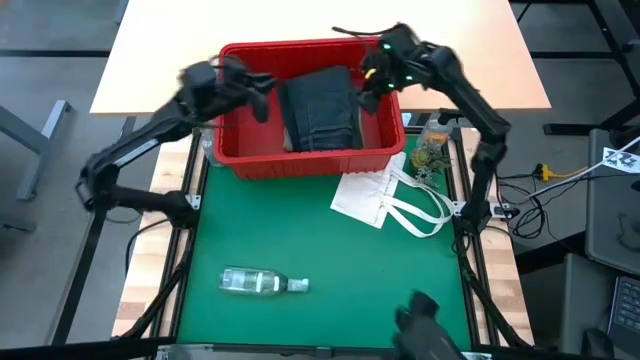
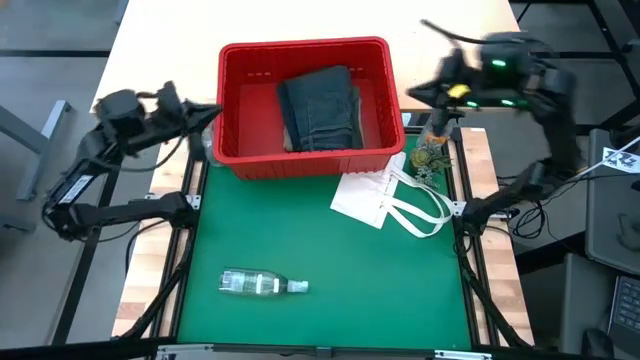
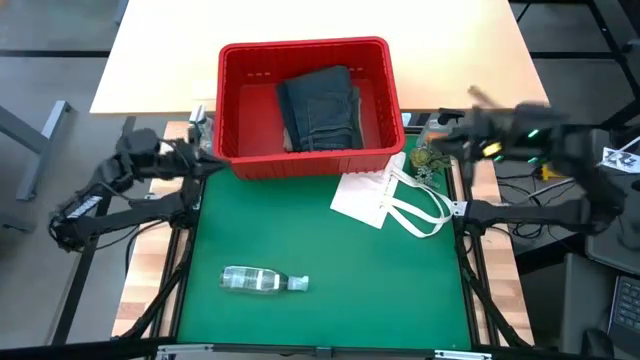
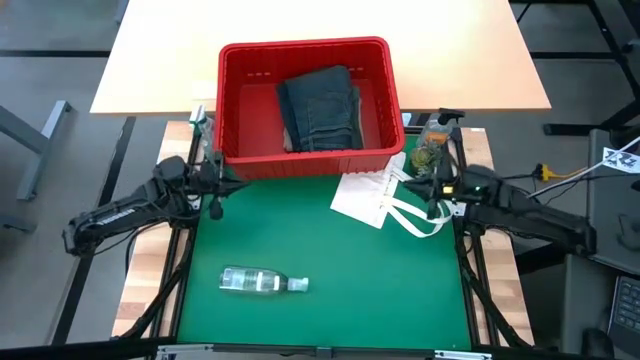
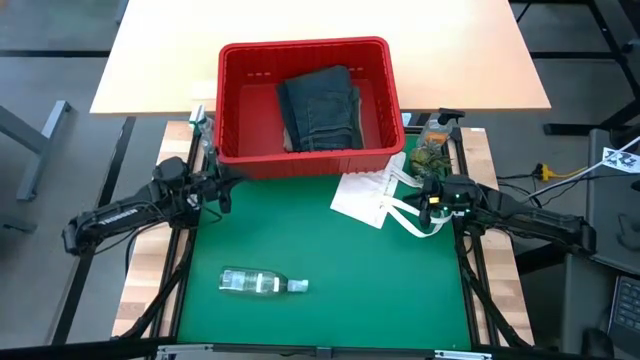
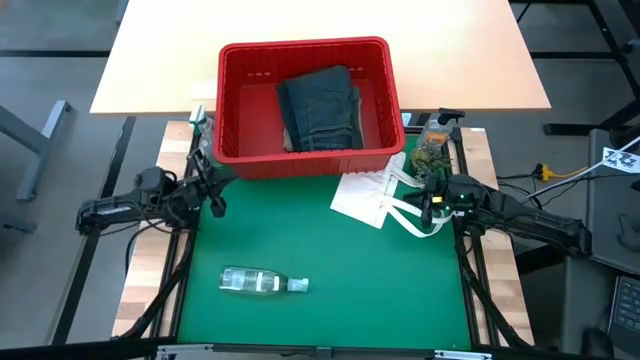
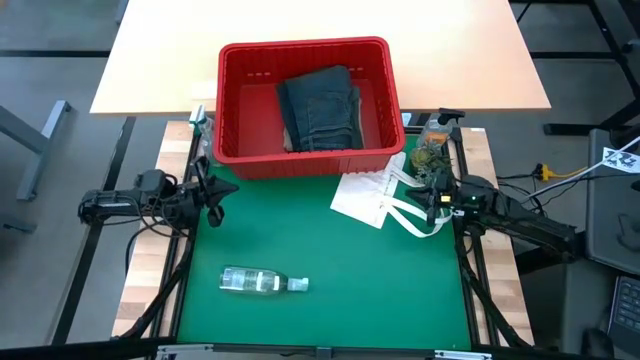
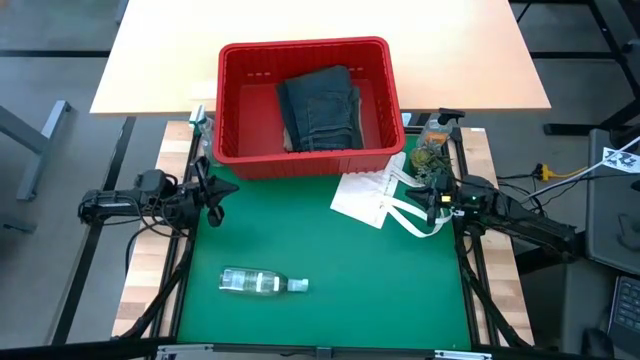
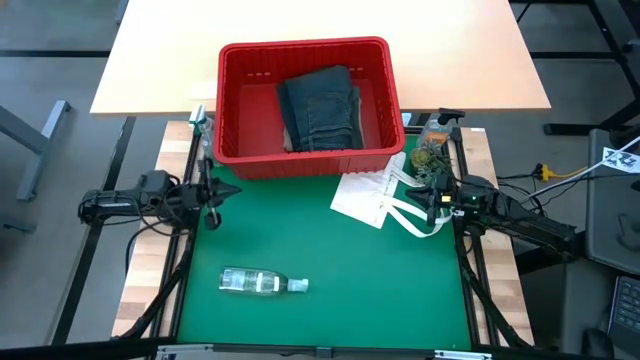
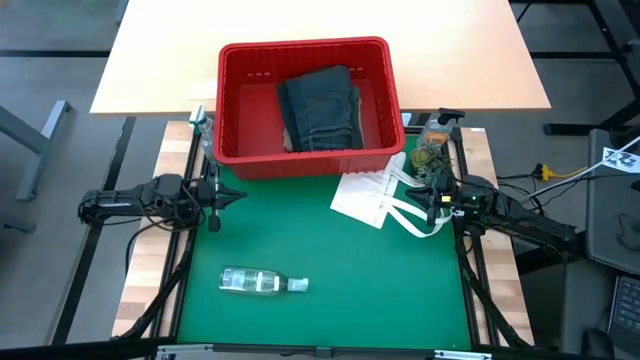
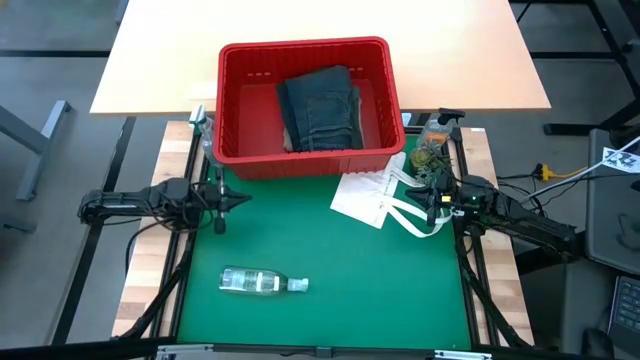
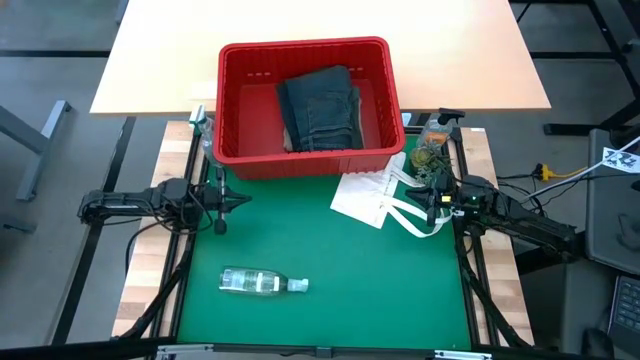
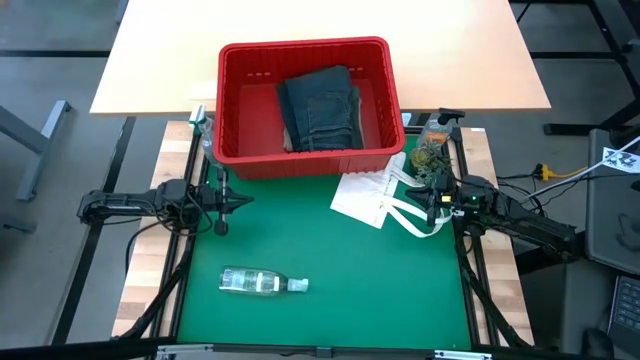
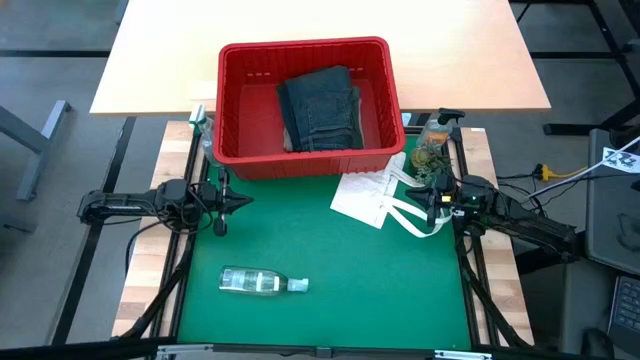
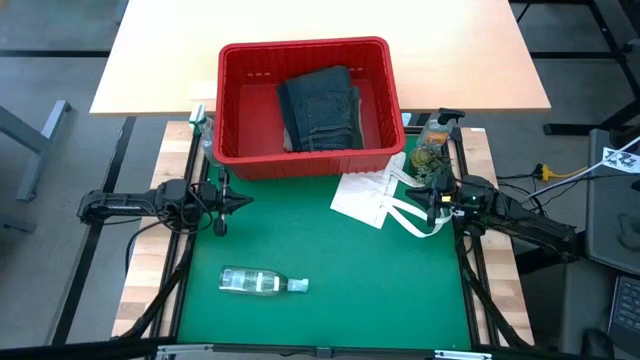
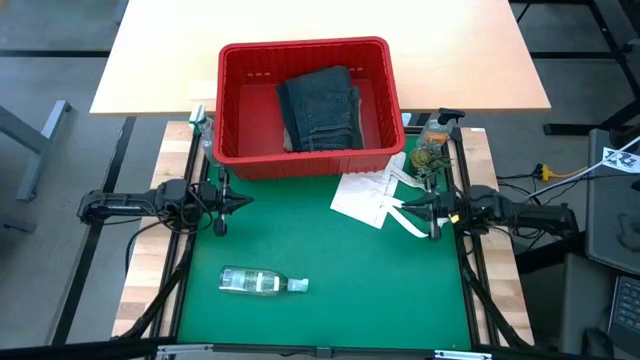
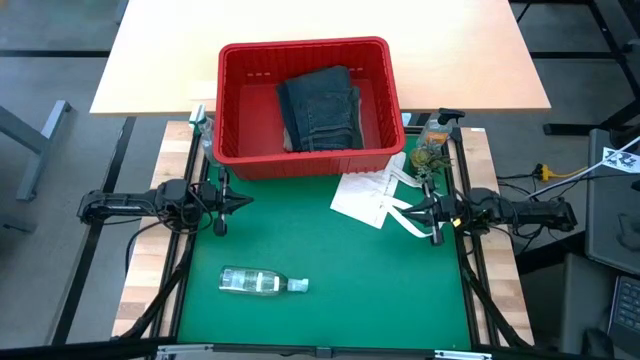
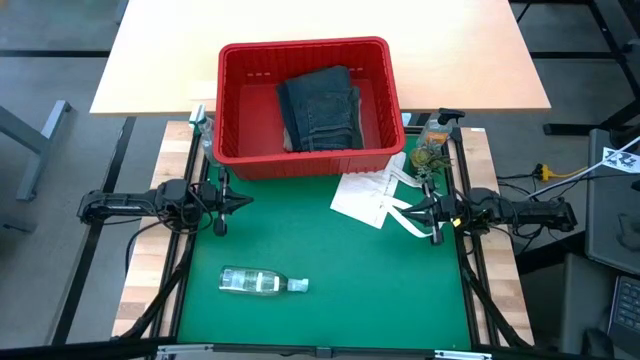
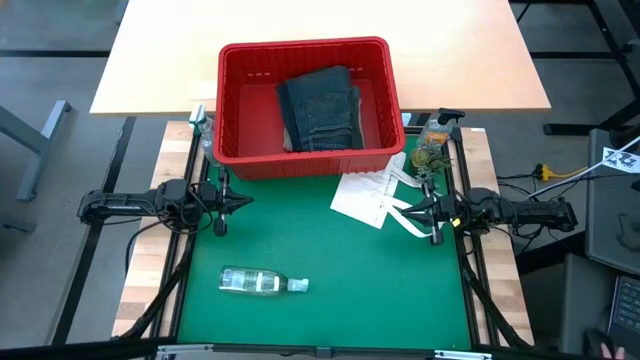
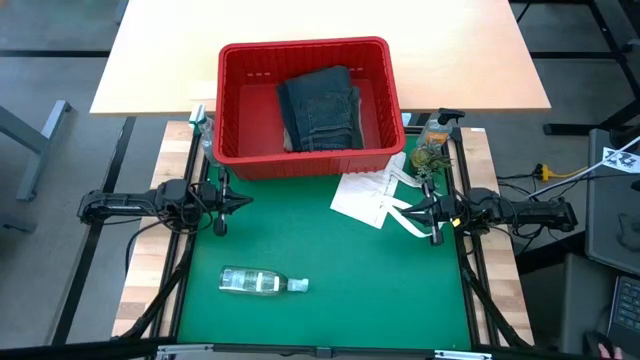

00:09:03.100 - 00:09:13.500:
Task: Fold laundry
Return to Home Position

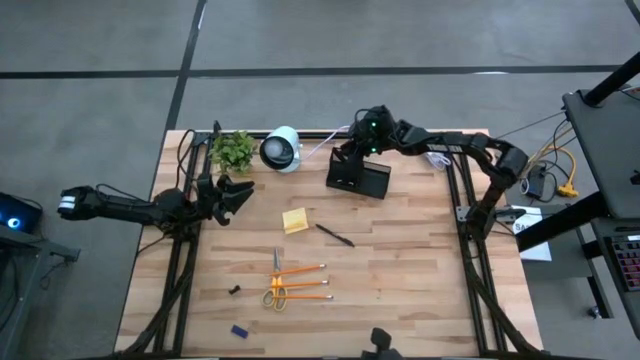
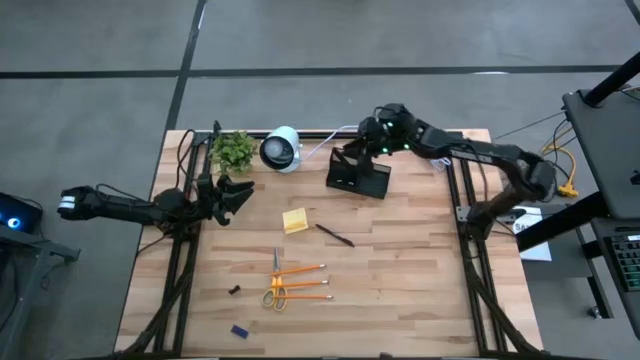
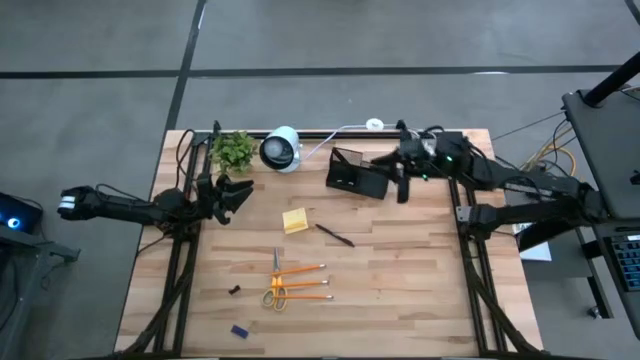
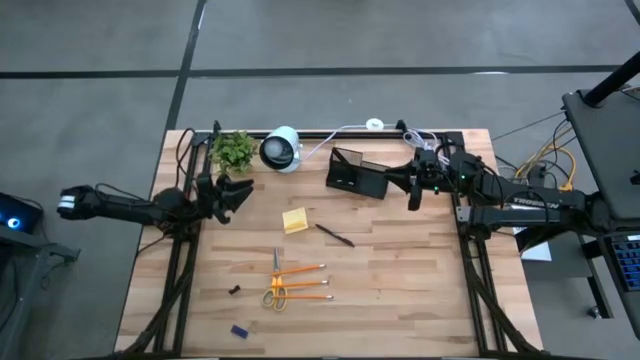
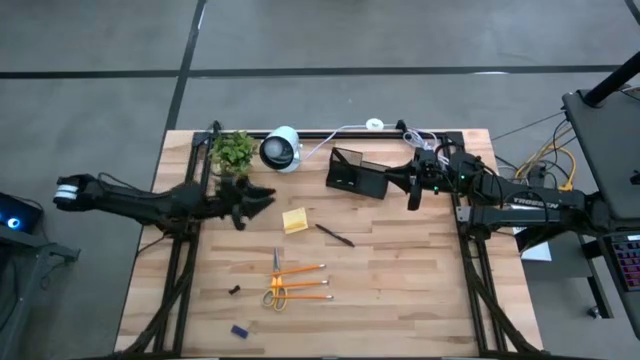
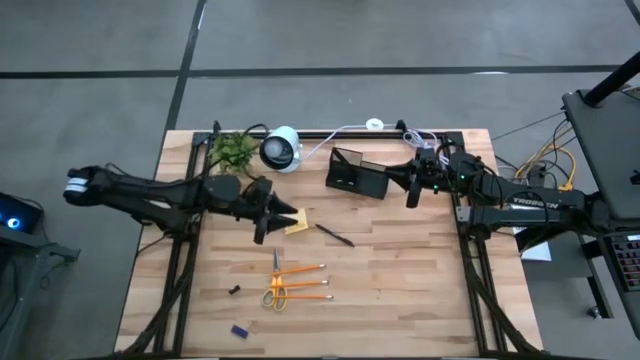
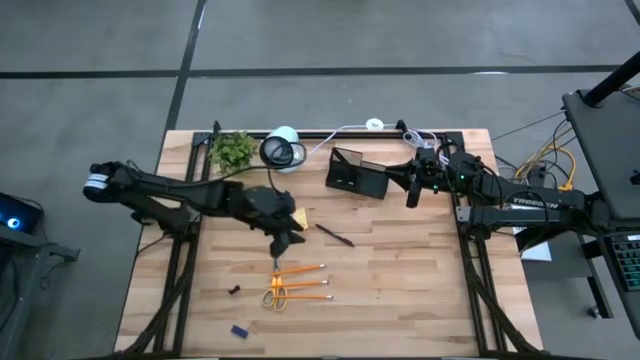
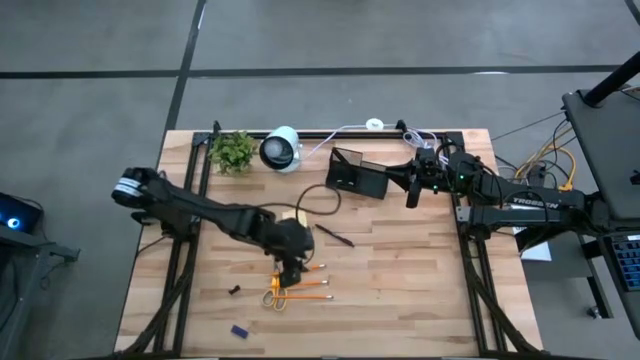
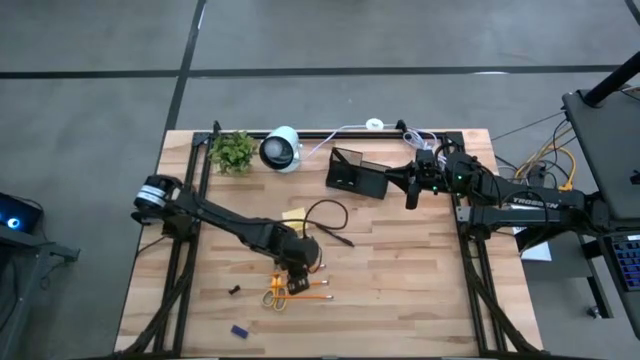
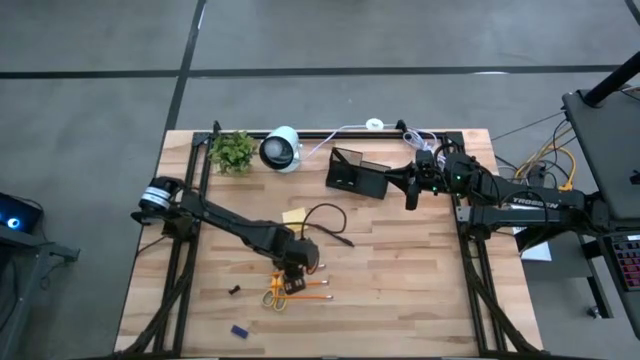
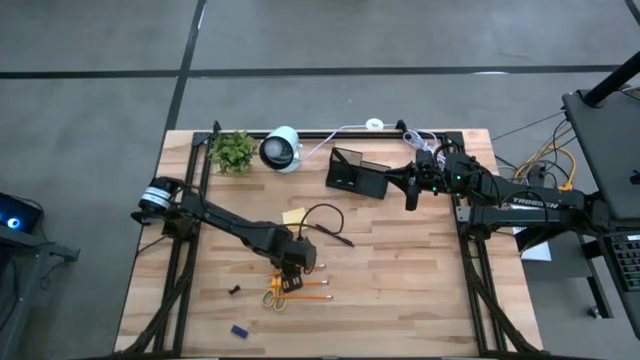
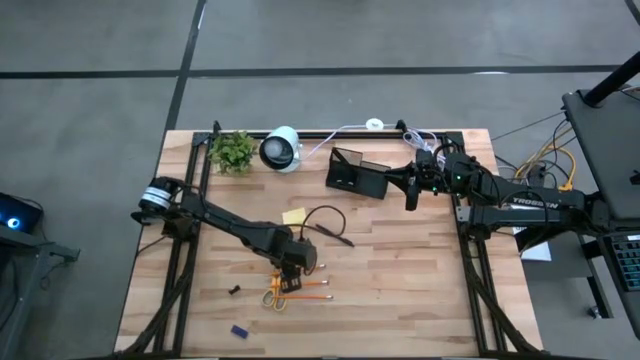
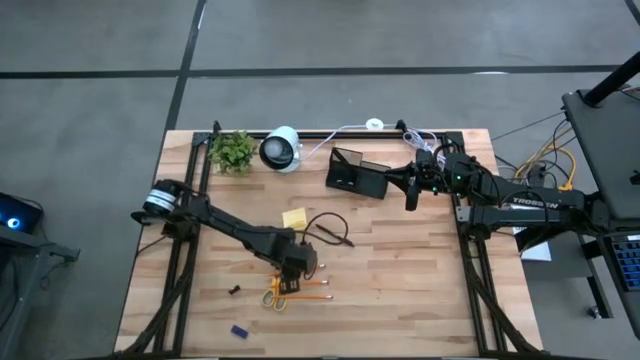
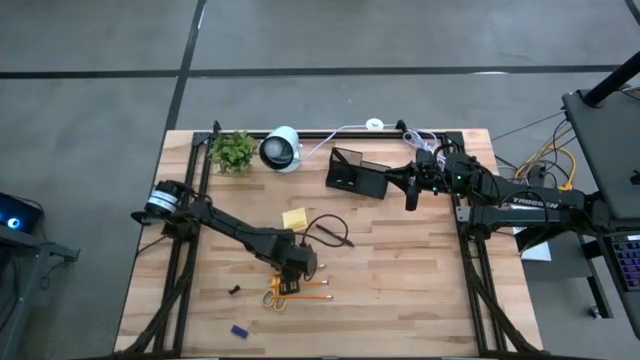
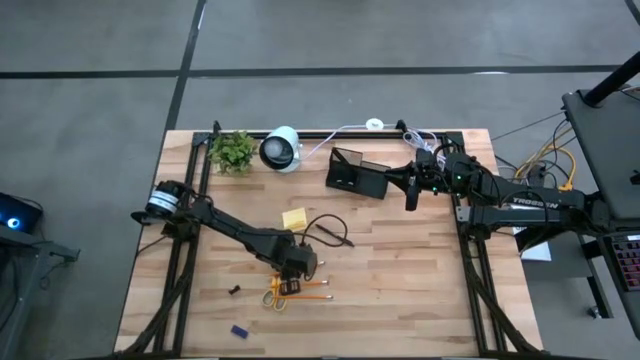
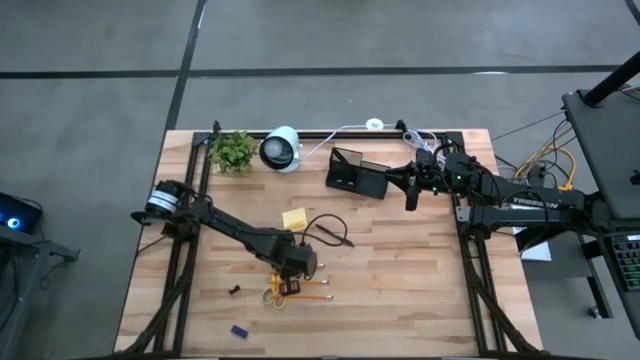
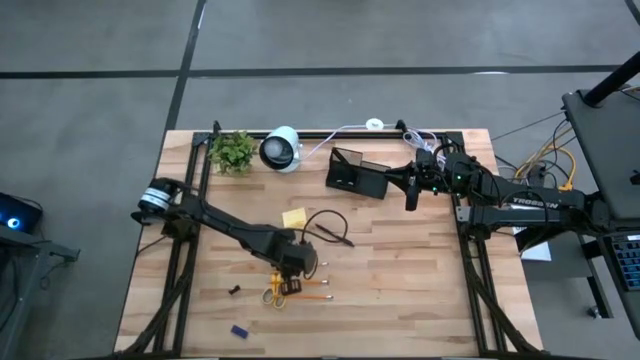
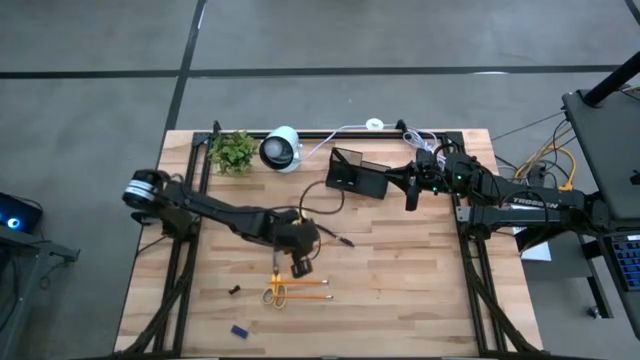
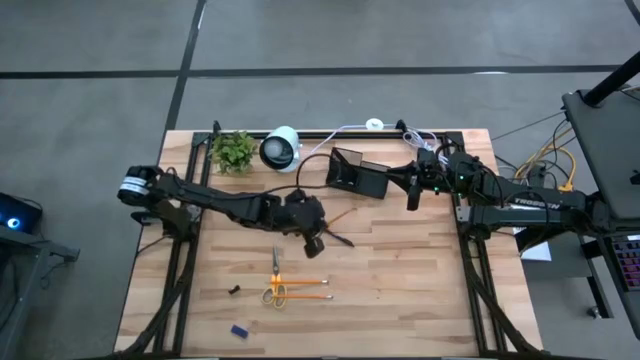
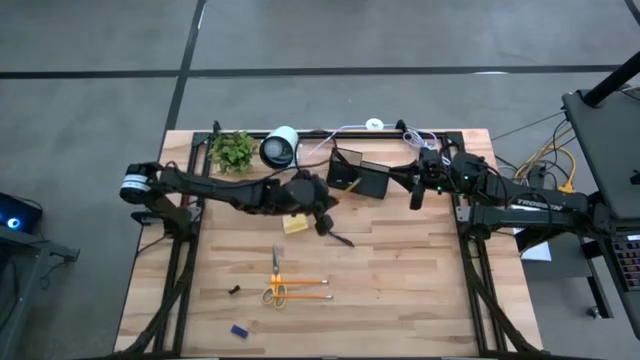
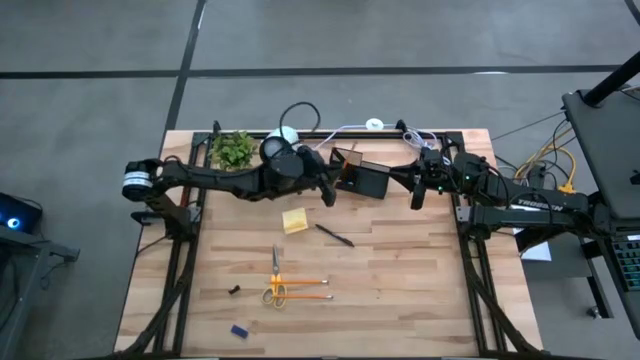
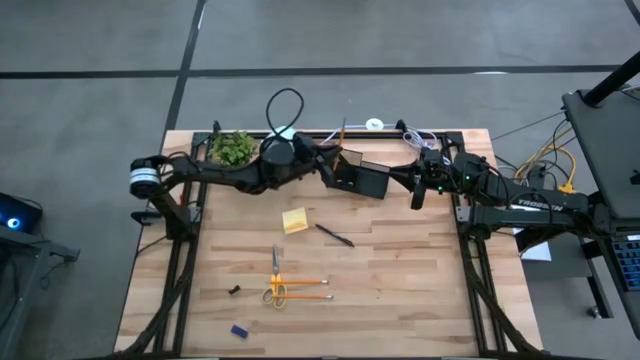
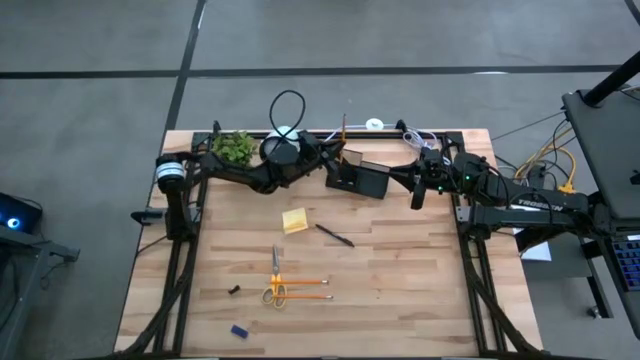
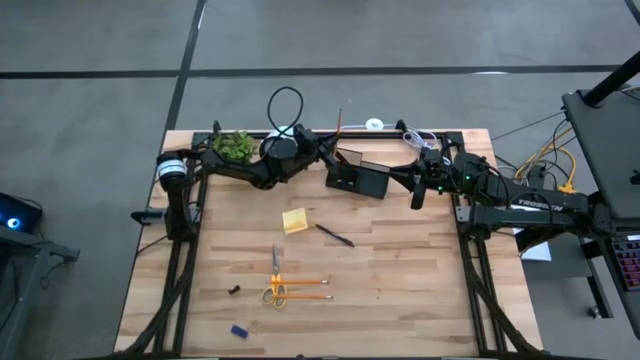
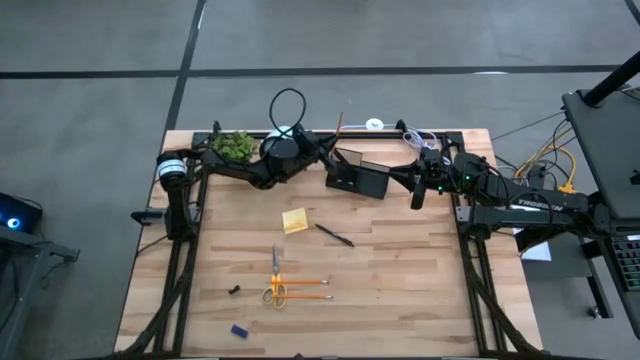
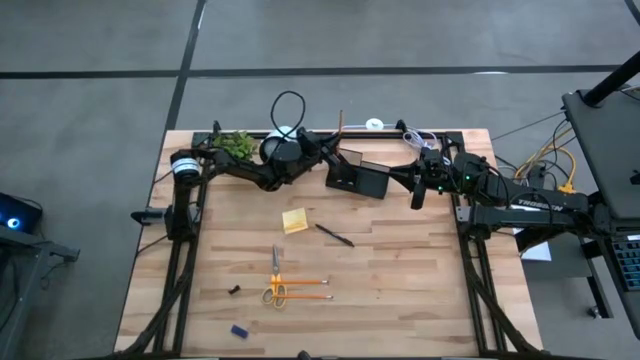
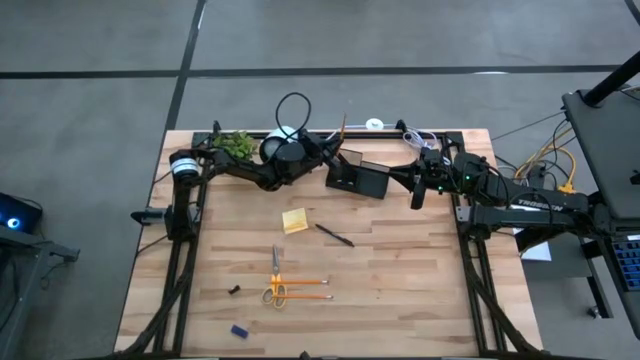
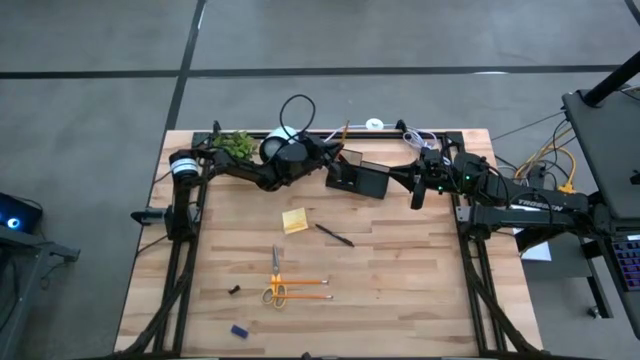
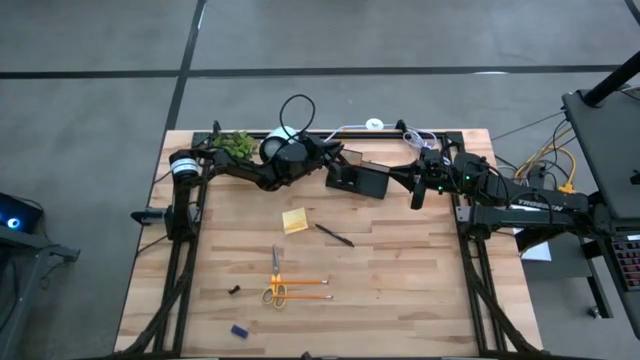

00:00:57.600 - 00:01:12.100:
Task: Pick and place office supplies into organizer
Put the top pencil into the desk organizer
